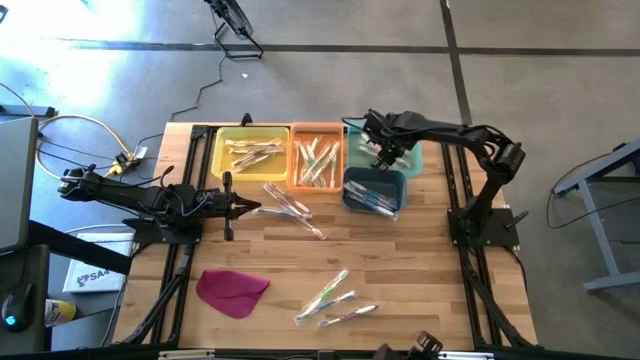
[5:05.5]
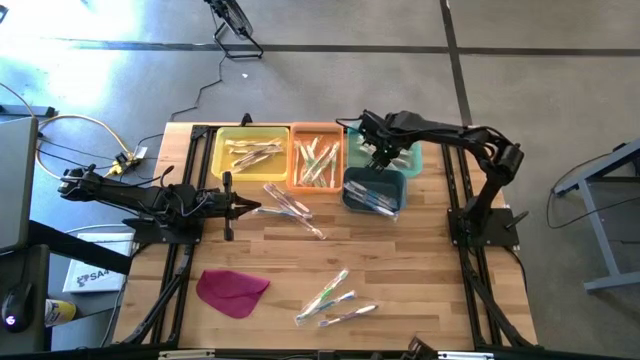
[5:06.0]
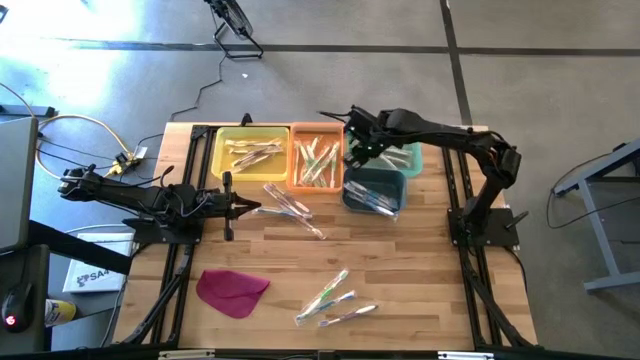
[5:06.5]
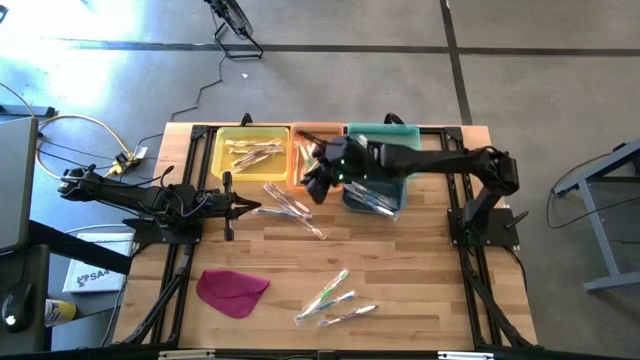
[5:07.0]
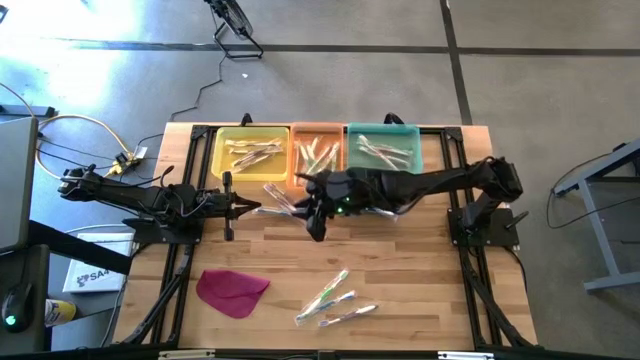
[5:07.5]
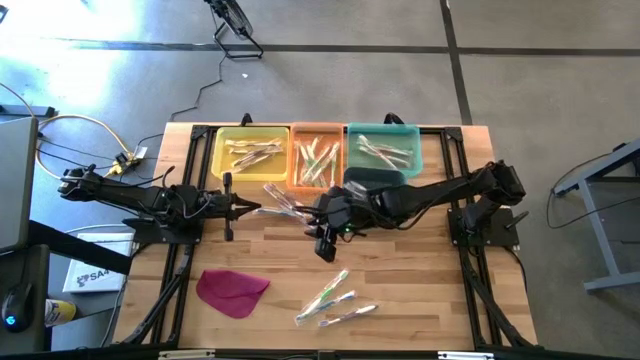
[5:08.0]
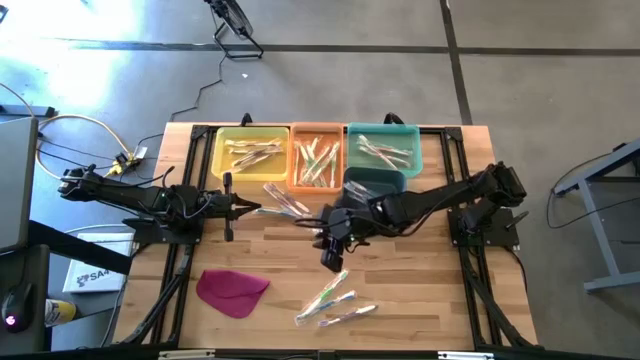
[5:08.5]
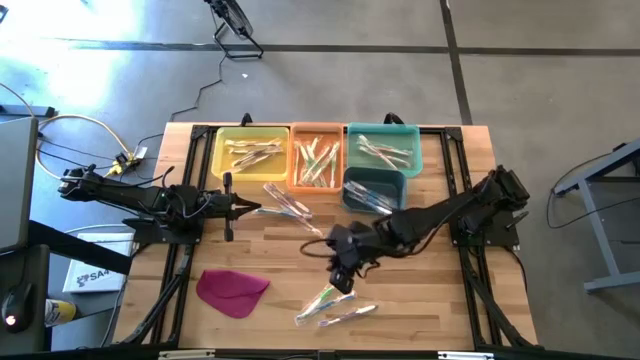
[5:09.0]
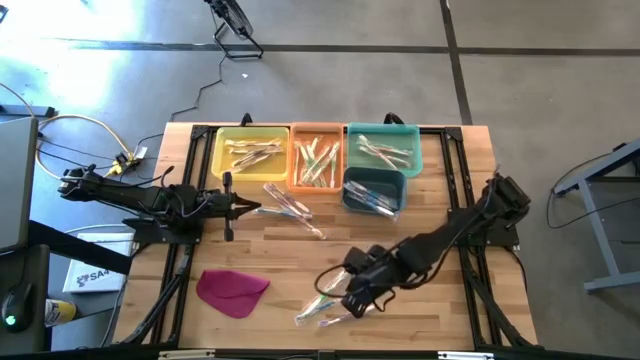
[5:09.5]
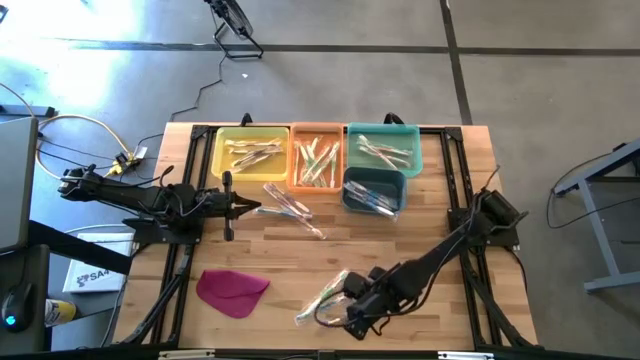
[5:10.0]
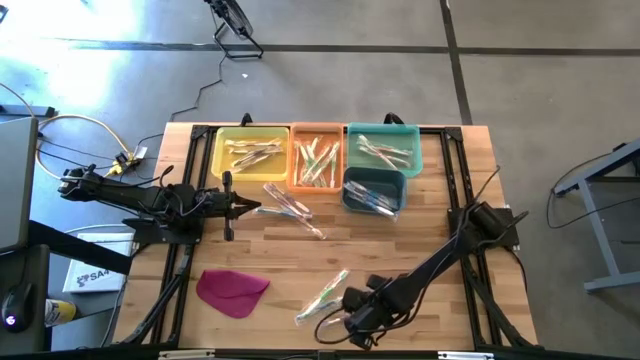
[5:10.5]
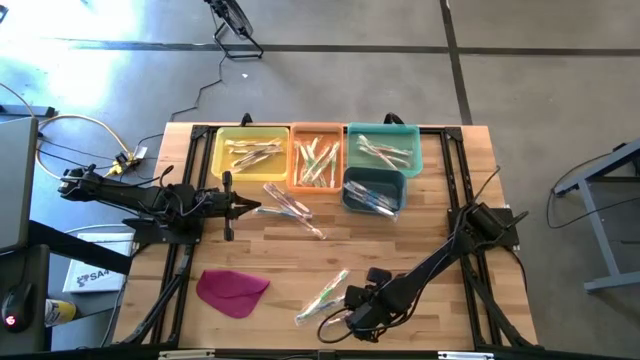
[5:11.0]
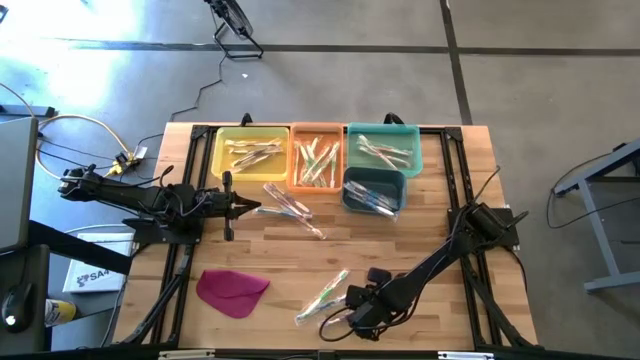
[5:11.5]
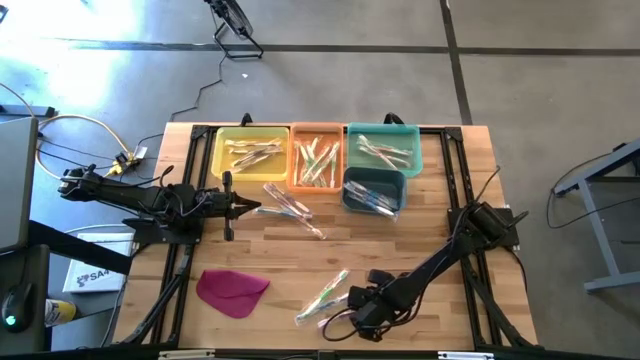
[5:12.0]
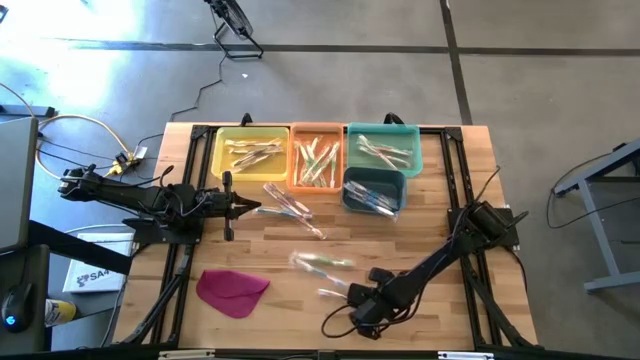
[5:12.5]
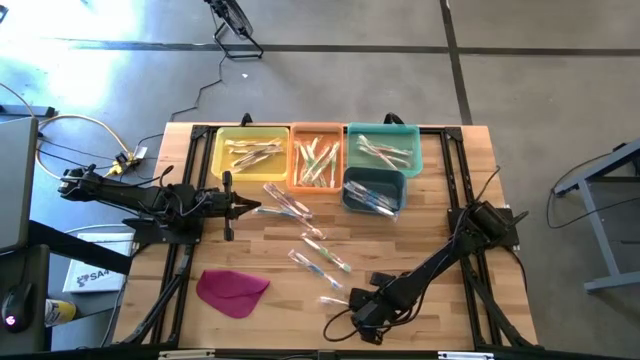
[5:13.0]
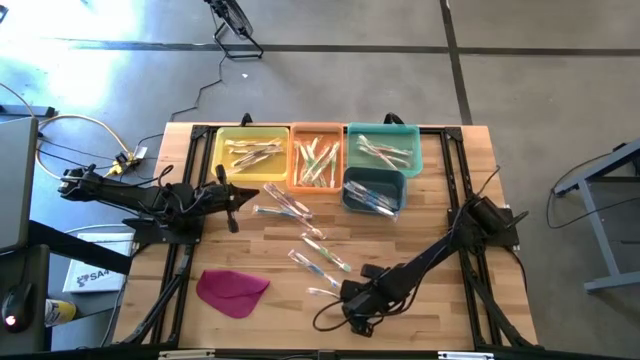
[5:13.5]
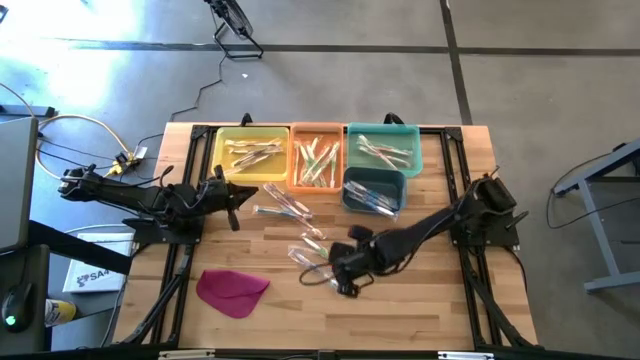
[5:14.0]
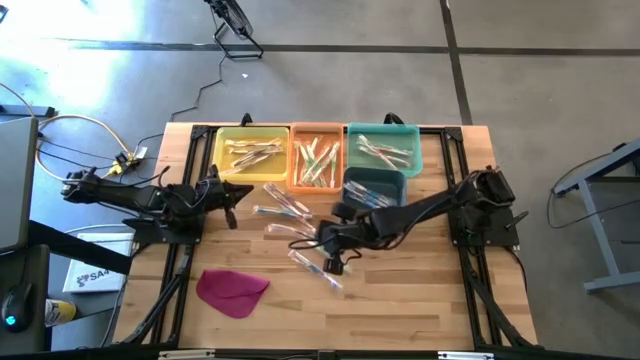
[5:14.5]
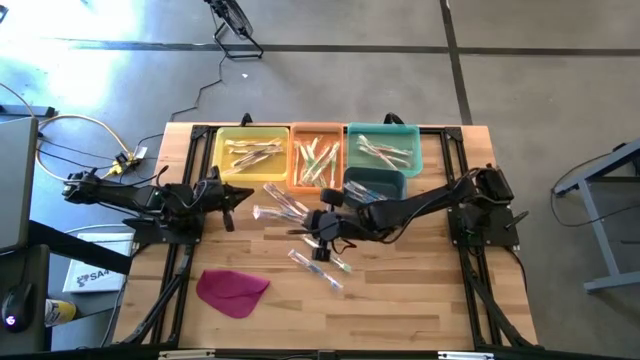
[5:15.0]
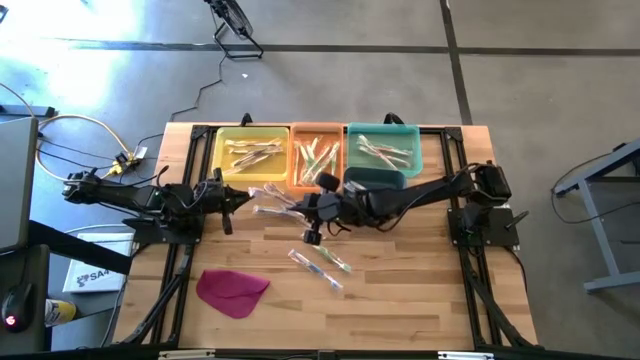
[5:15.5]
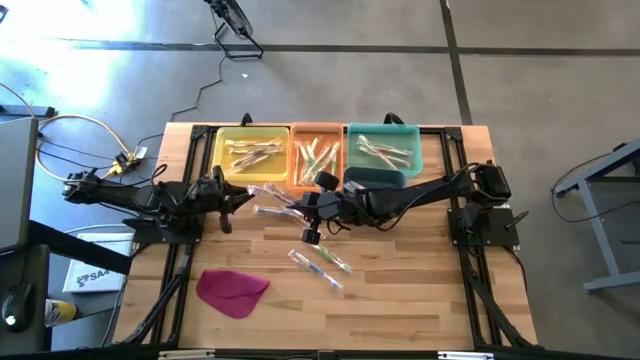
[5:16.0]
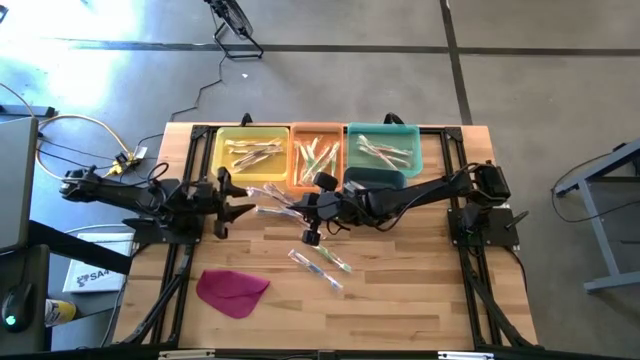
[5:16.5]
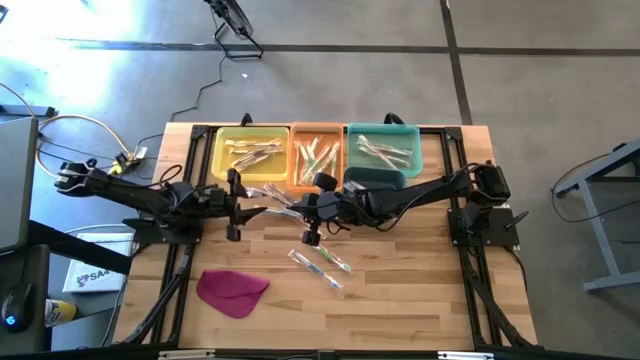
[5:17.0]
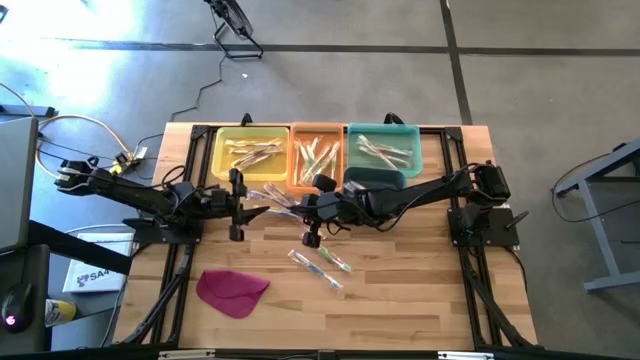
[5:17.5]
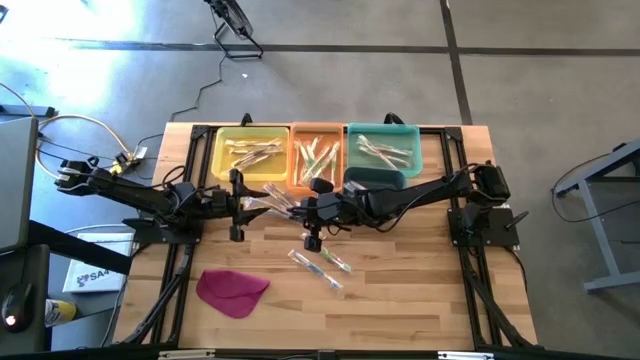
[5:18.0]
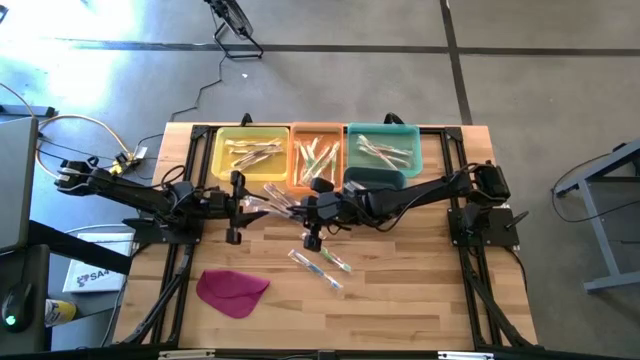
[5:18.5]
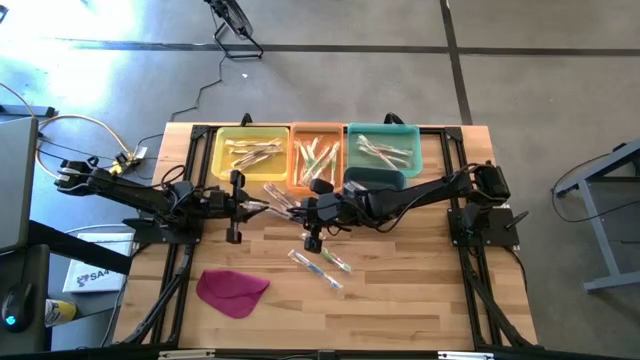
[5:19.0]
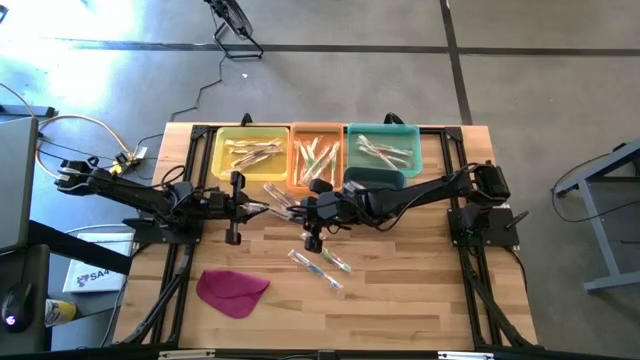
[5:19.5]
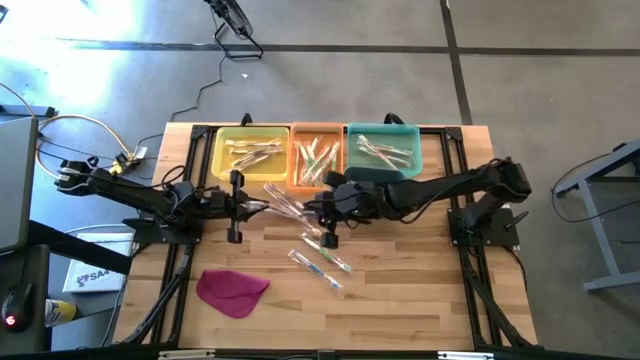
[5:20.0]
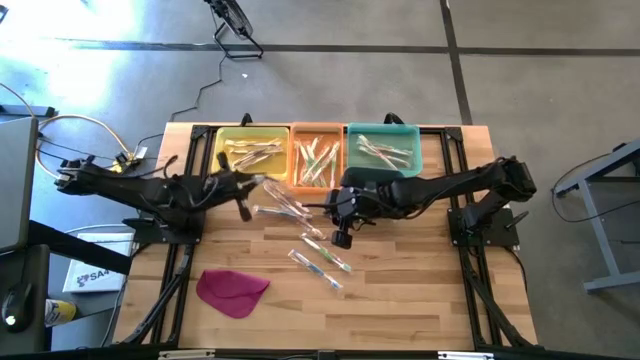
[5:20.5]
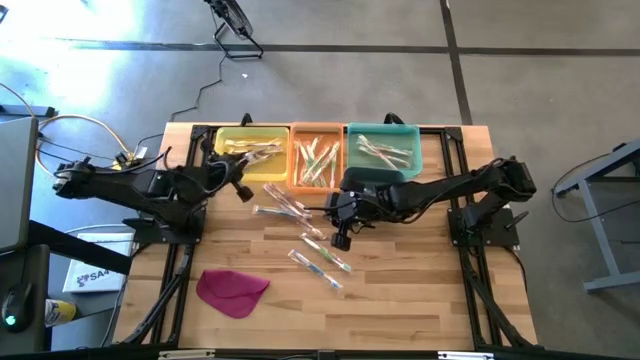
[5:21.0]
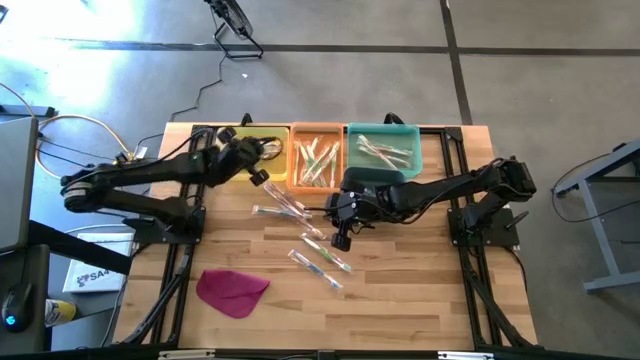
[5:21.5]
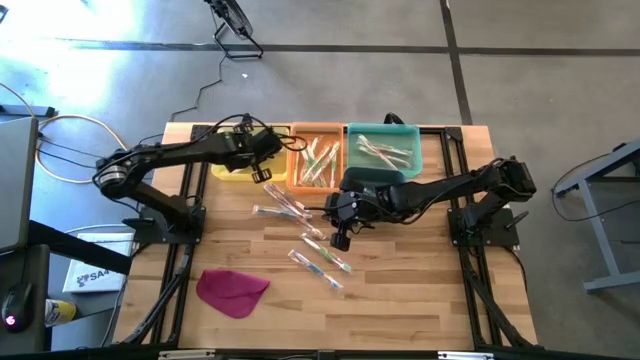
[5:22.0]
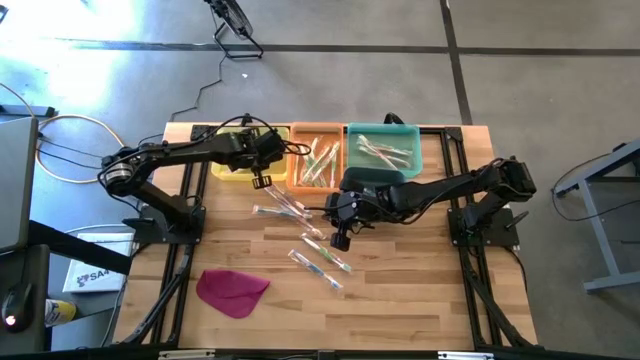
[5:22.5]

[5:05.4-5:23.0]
Task: Pick & Place Toothbrushes
Put the violet toothbrush into the yellow bin

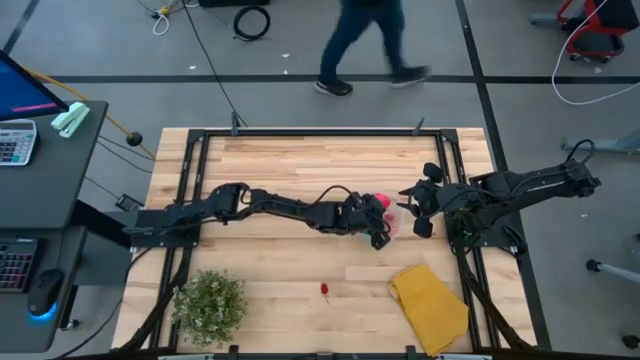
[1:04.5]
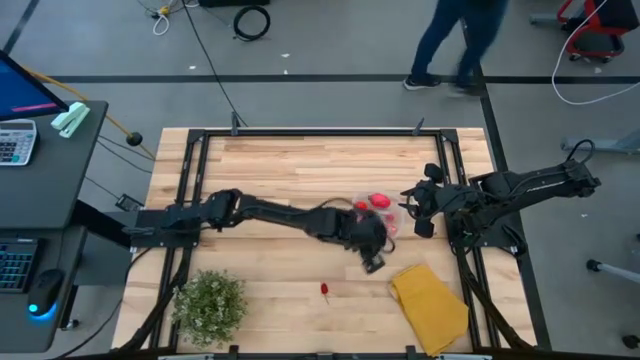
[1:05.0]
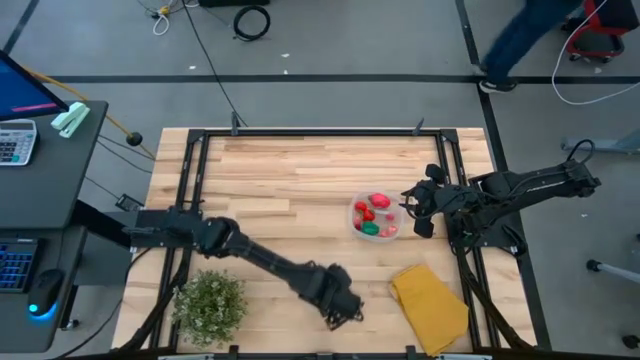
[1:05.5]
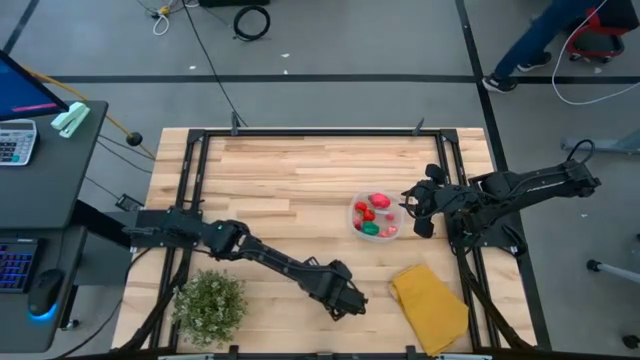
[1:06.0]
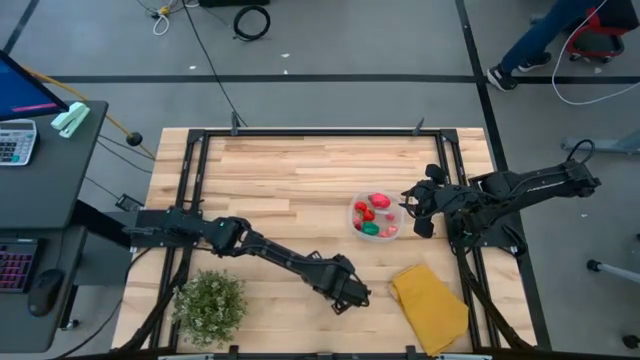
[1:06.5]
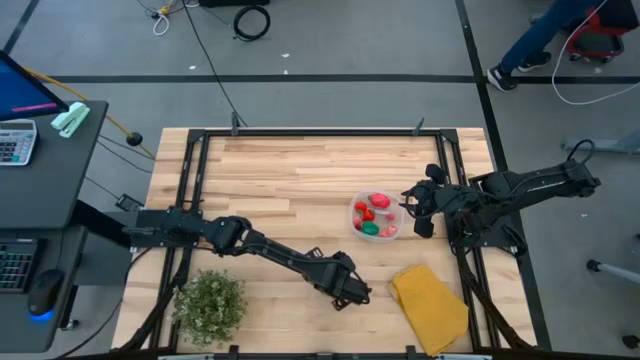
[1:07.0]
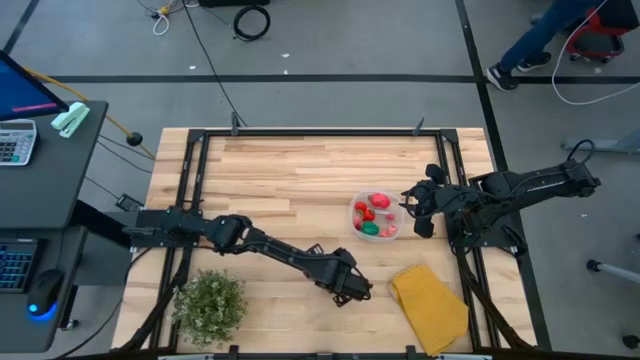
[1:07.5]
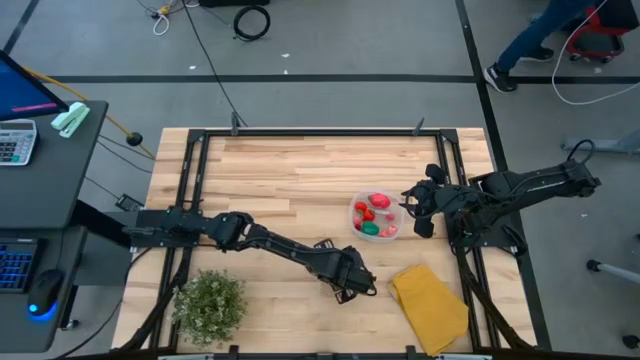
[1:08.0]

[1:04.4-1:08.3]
Task: Pick and placing Produce into tupperware
Put the red cherry into the transparent container

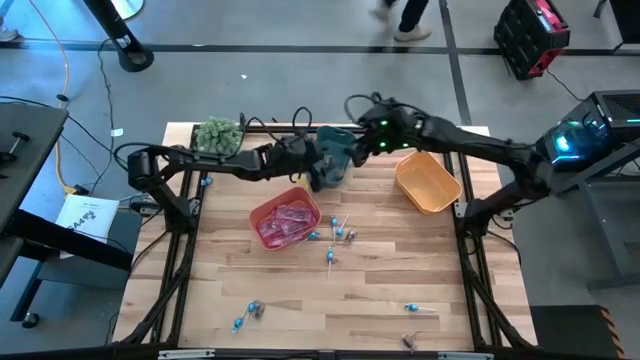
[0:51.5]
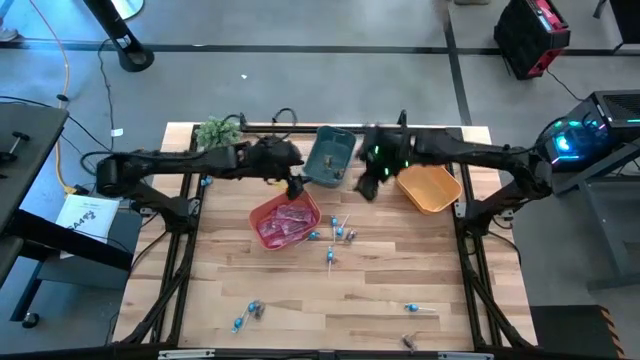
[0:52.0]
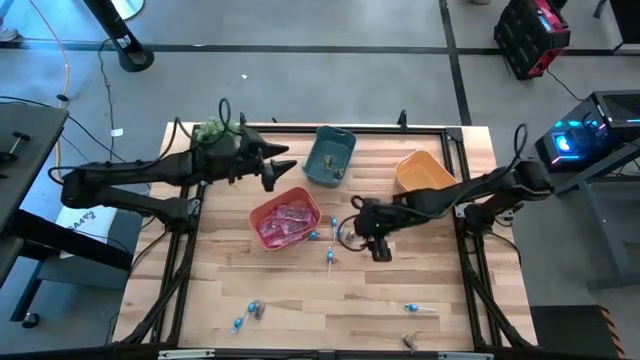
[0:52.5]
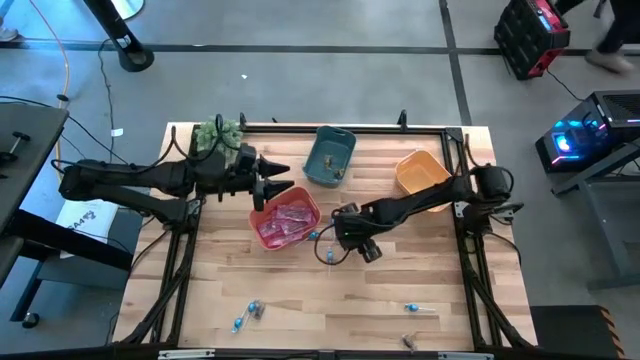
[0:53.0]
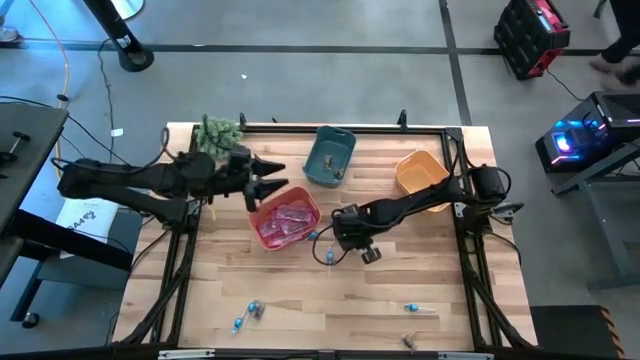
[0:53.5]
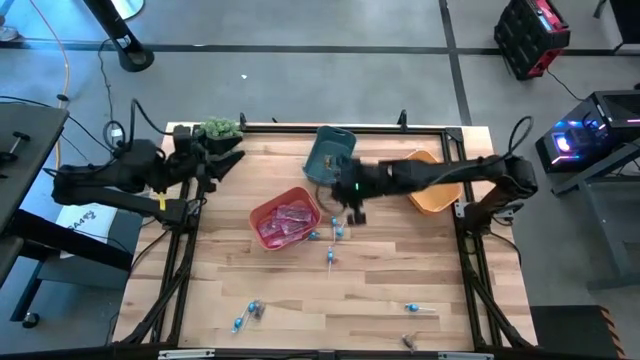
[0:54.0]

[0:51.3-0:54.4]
Task: Sort candy
Put the black candy into the blue bin
